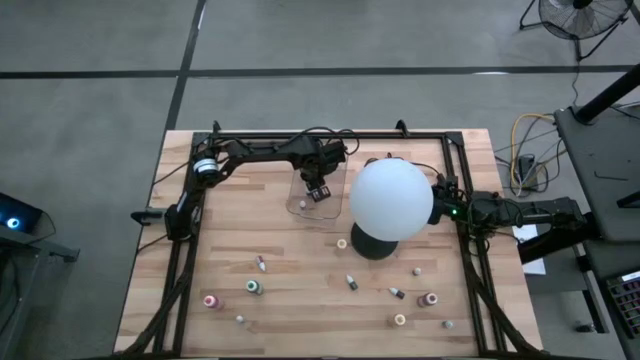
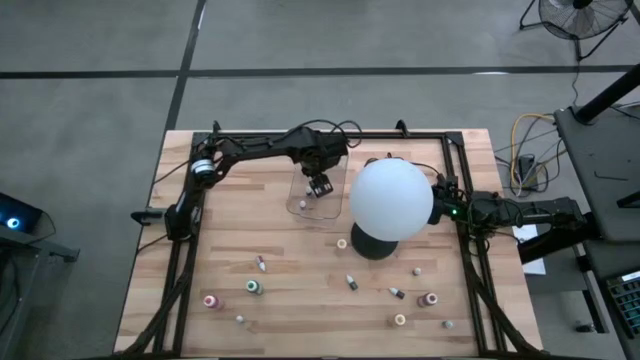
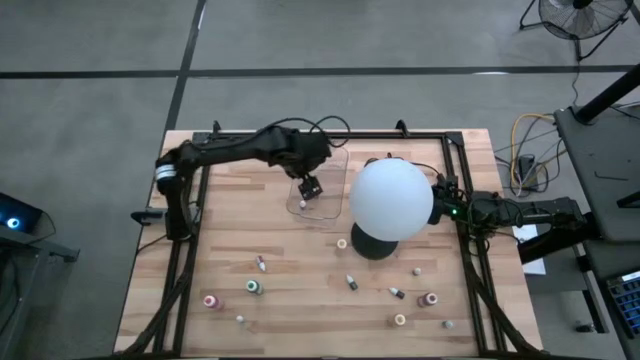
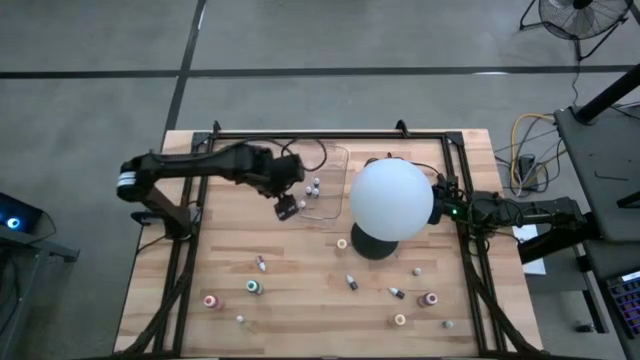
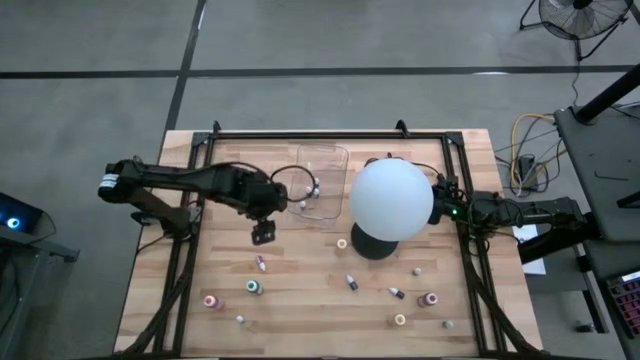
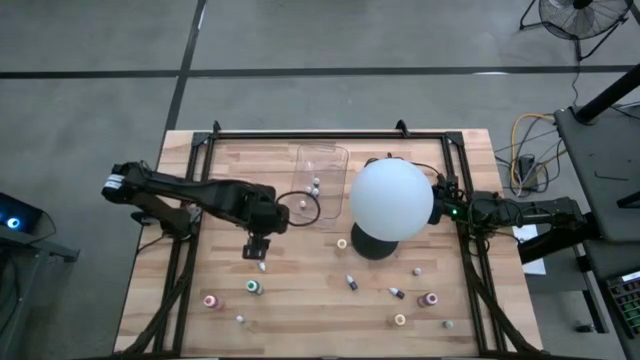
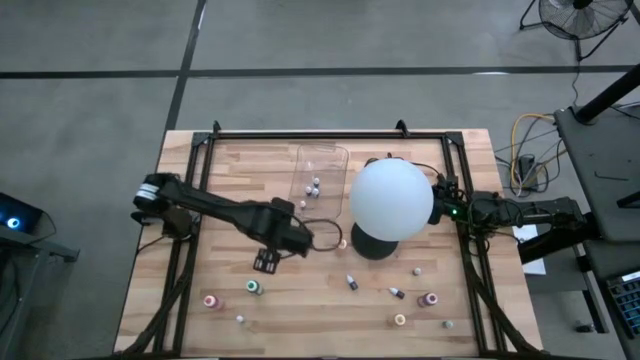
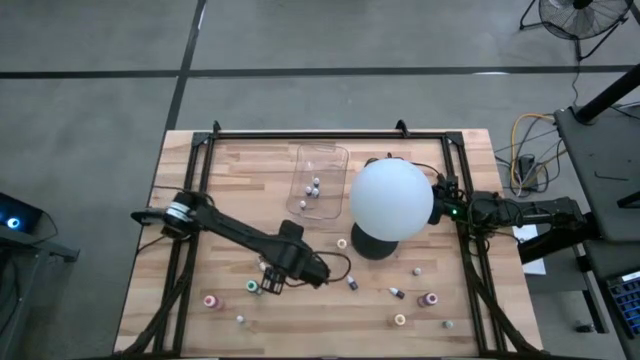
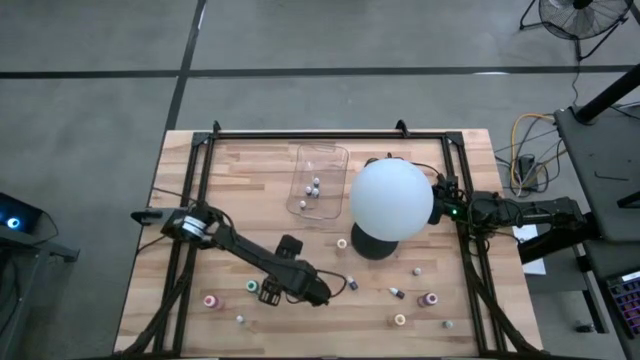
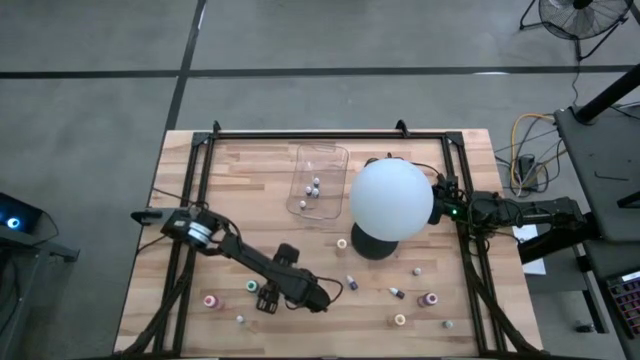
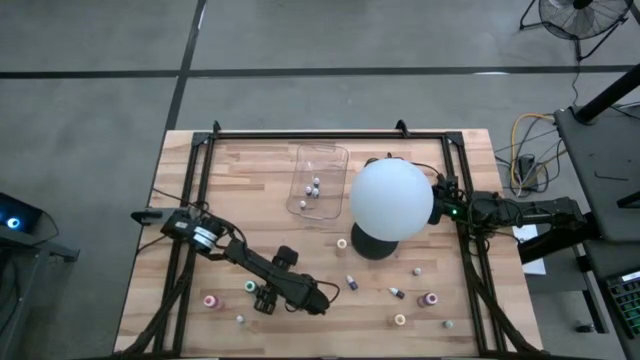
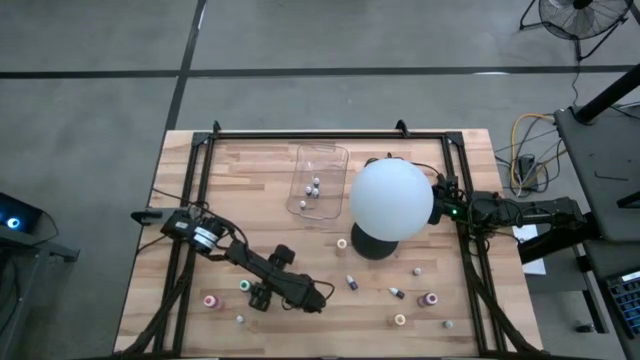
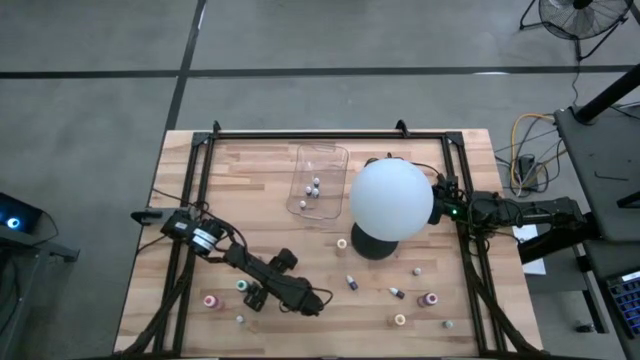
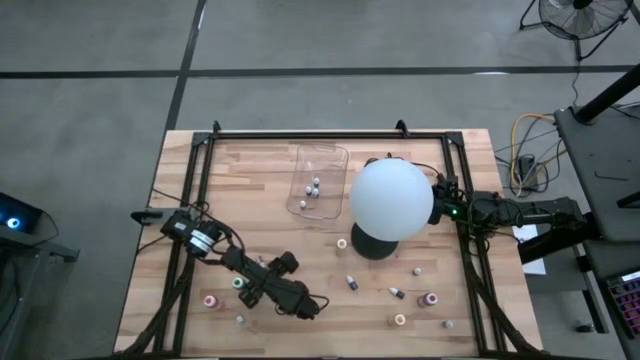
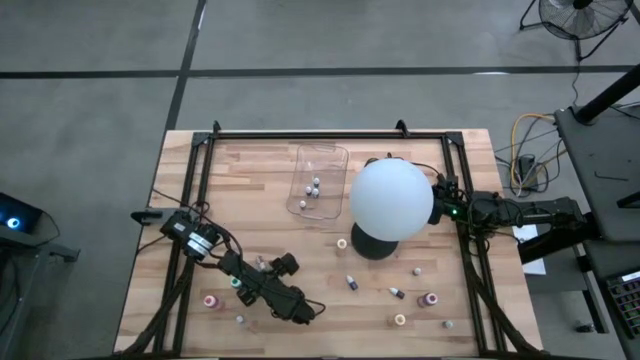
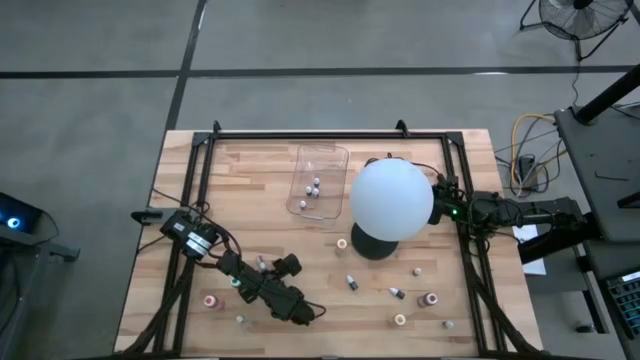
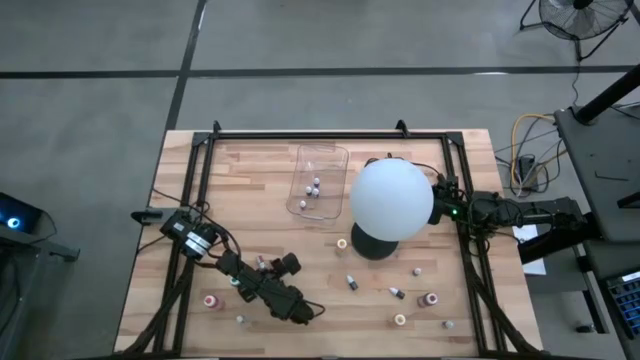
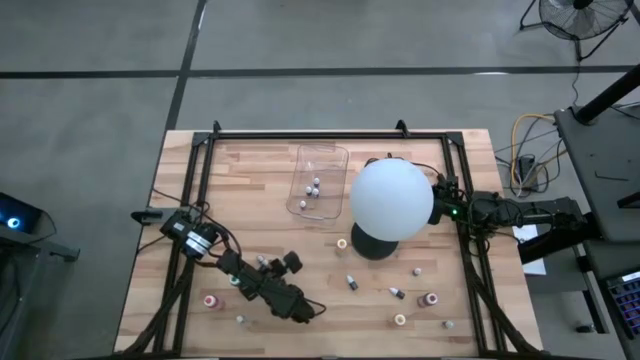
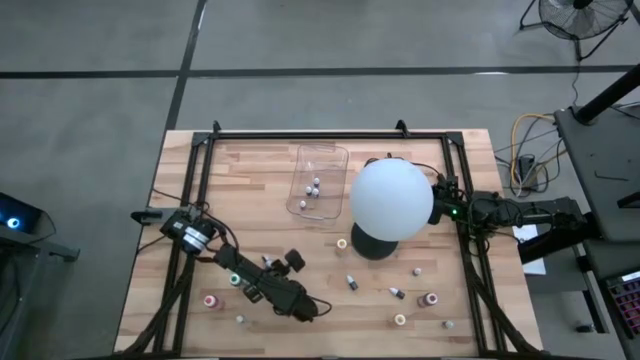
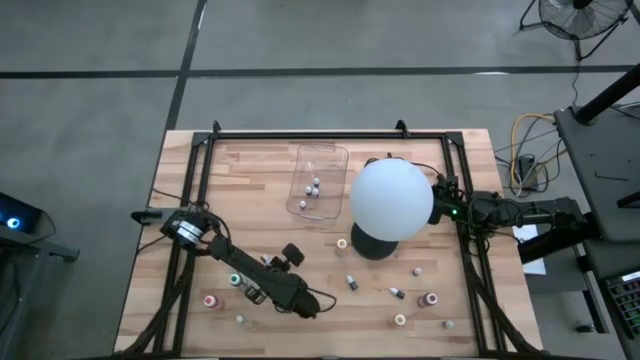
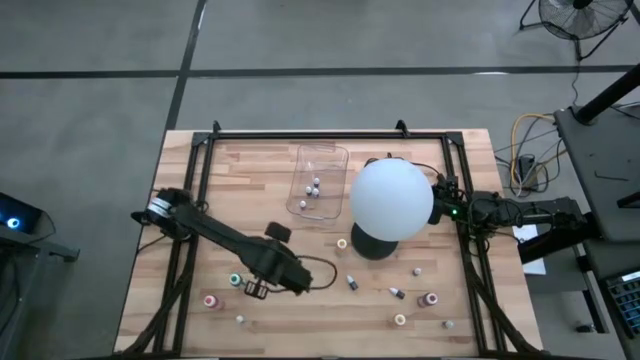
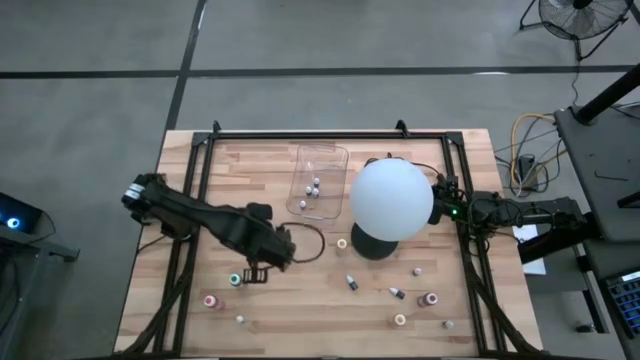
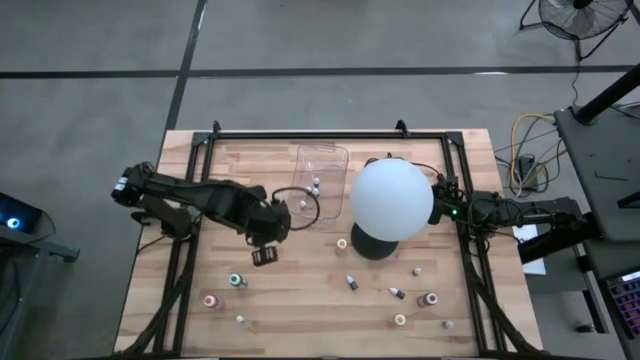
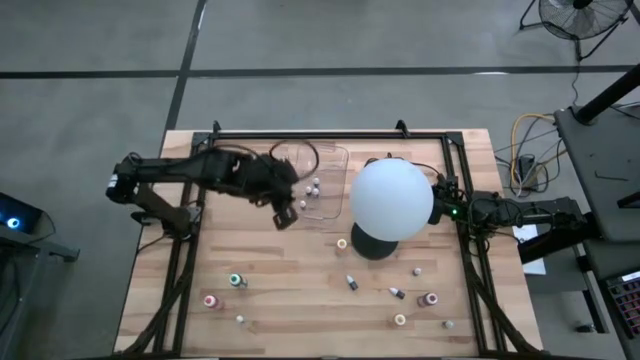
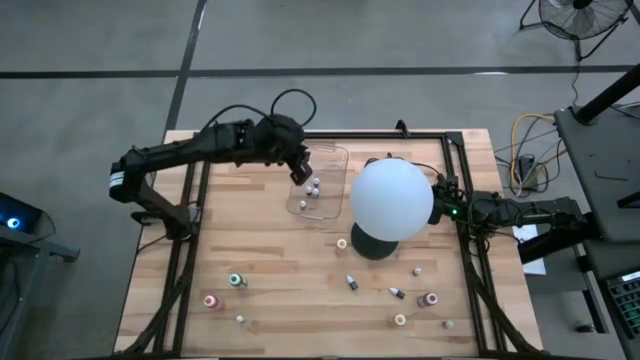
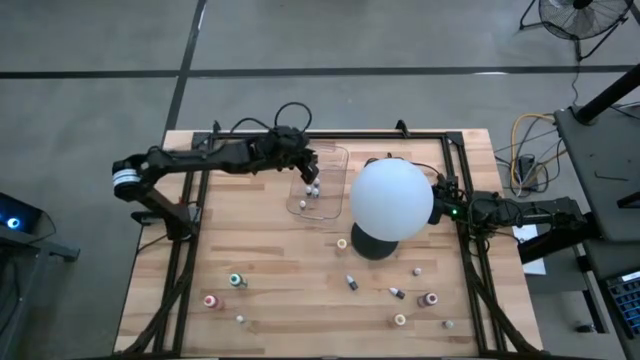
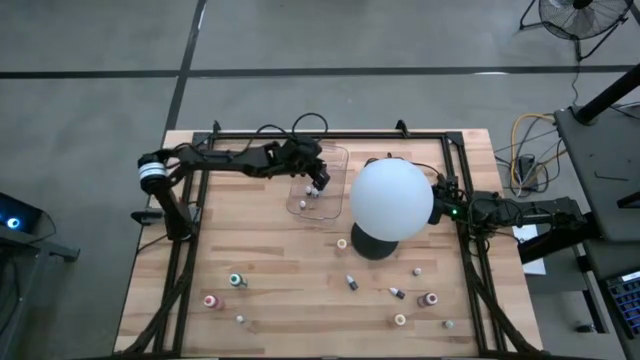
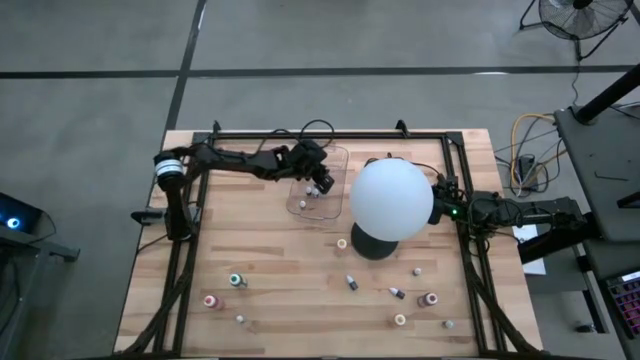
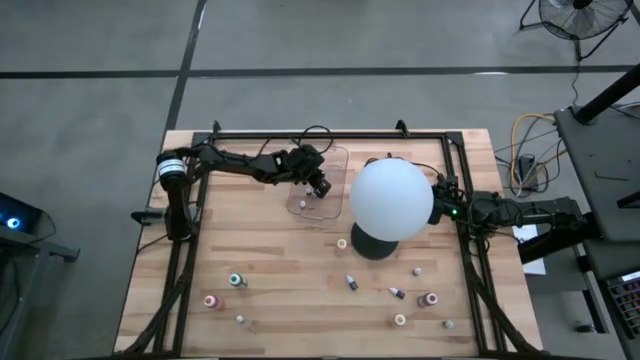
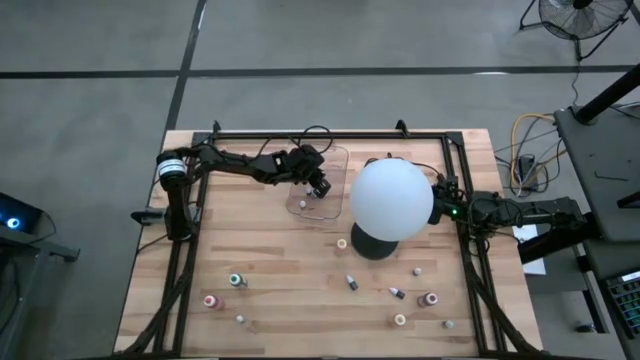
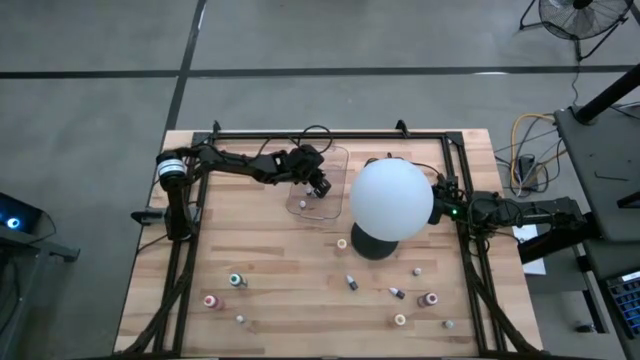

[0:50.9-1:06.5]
Task: Pick & Place food coloring
Put the small red food coloring bottle into the transparent bin

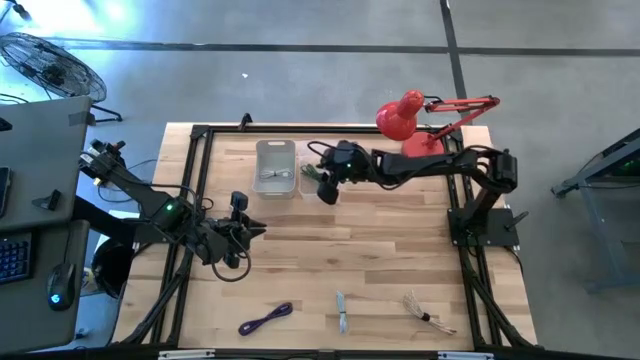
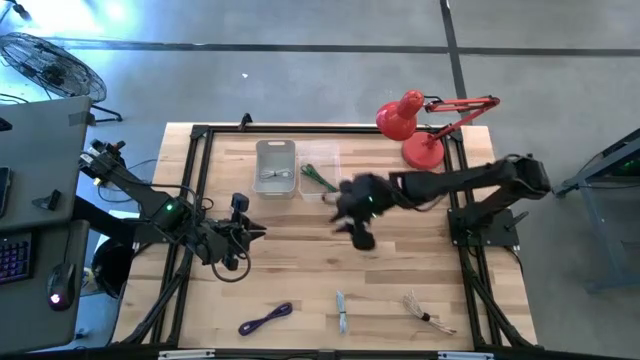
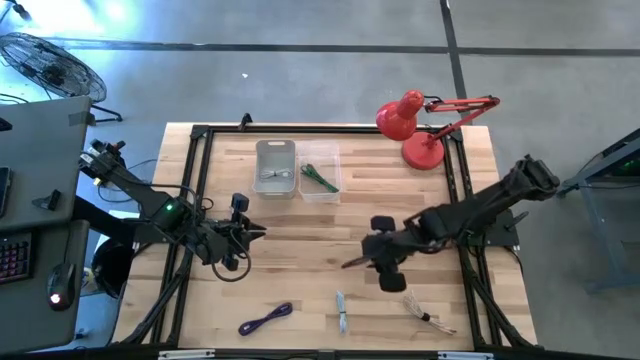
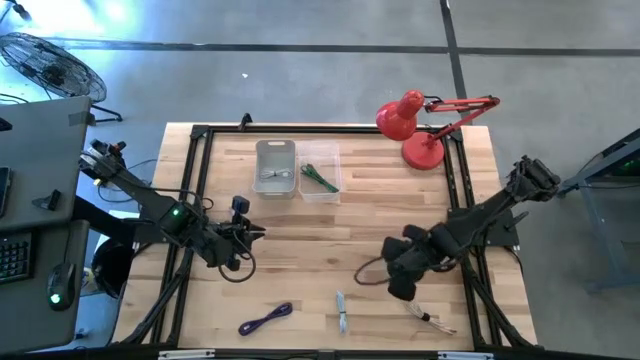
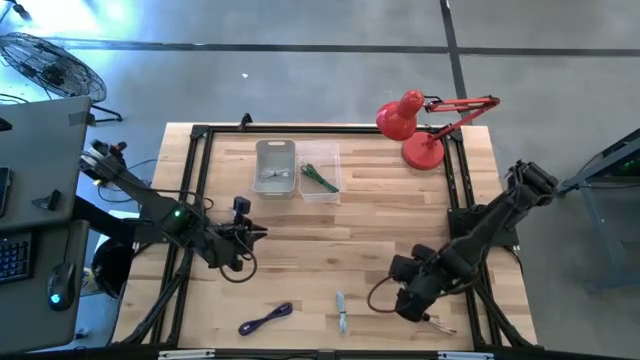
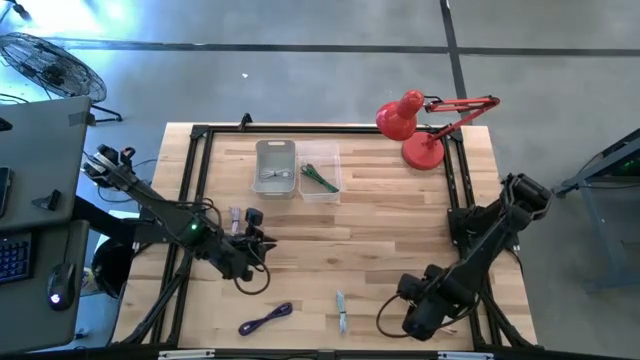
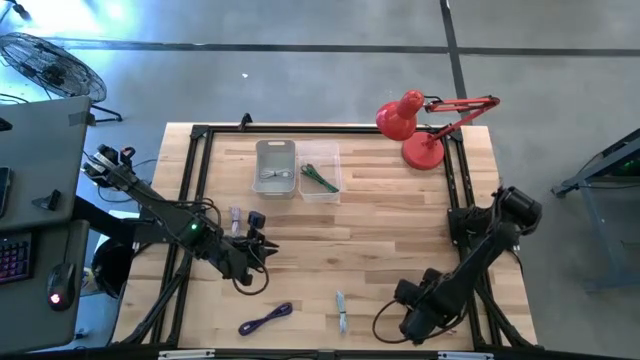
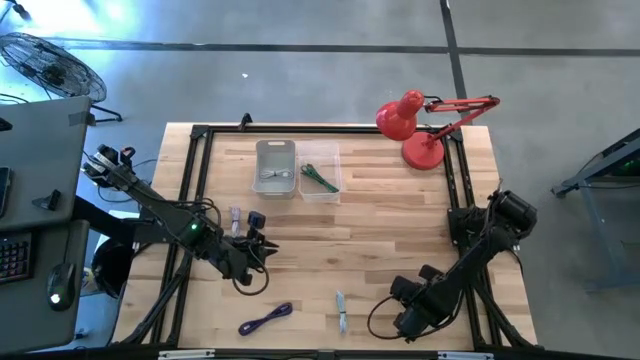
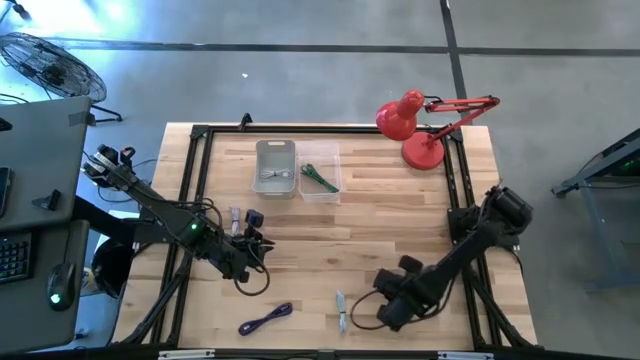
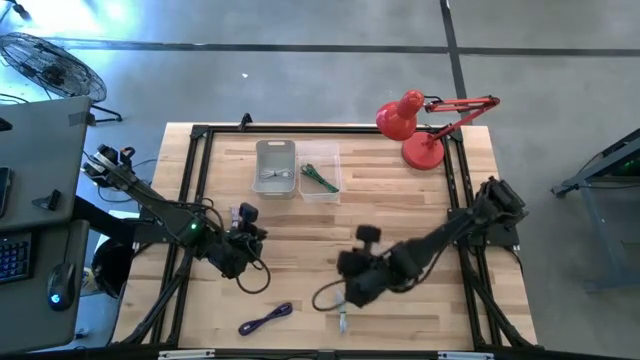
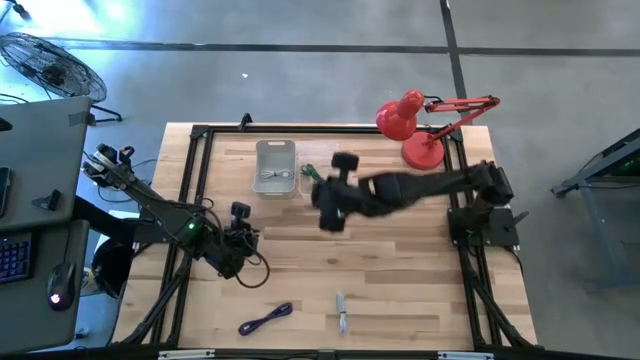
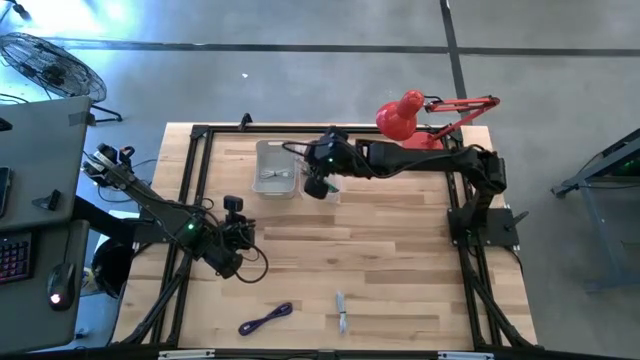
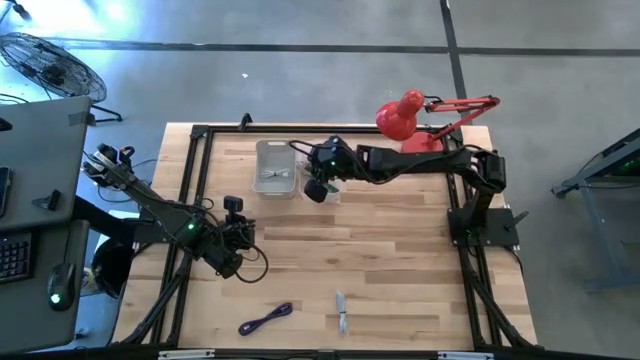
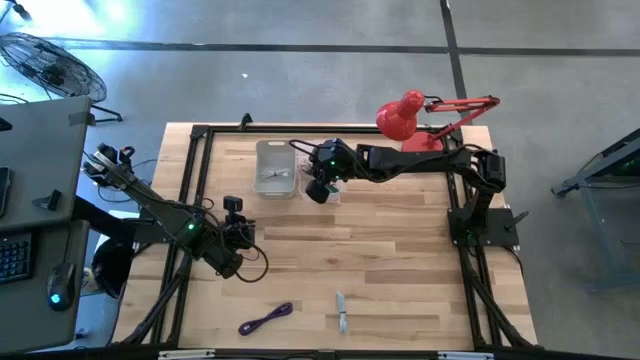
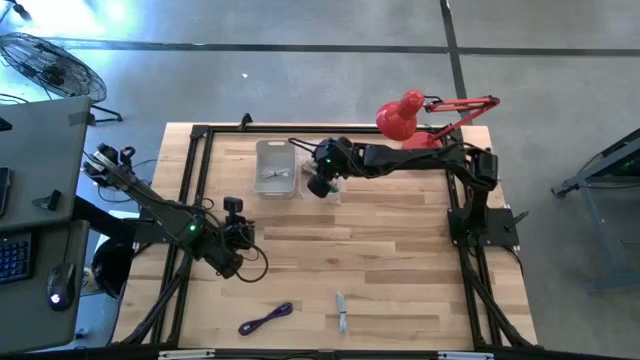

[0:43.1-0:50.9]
Task: Pick & Place USB Port
Put the pink patterned charger cable into the white bin
